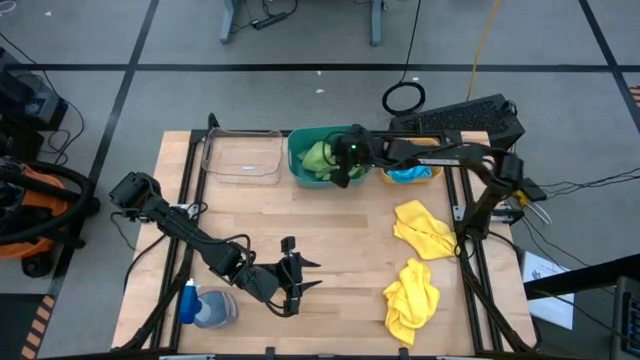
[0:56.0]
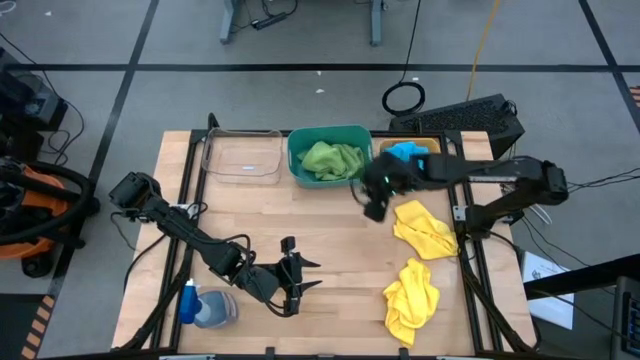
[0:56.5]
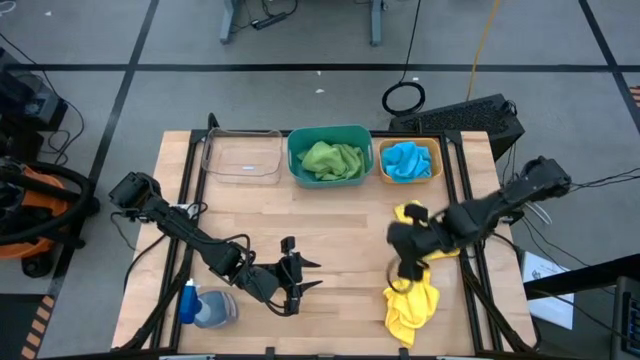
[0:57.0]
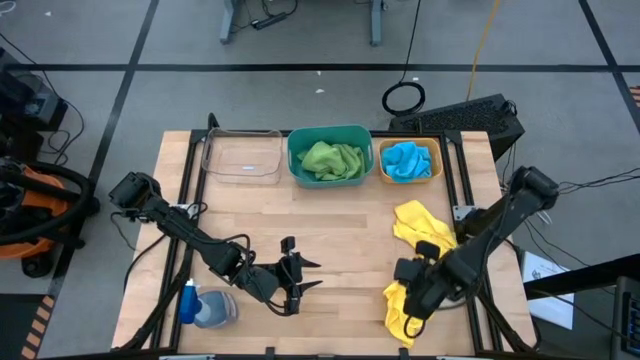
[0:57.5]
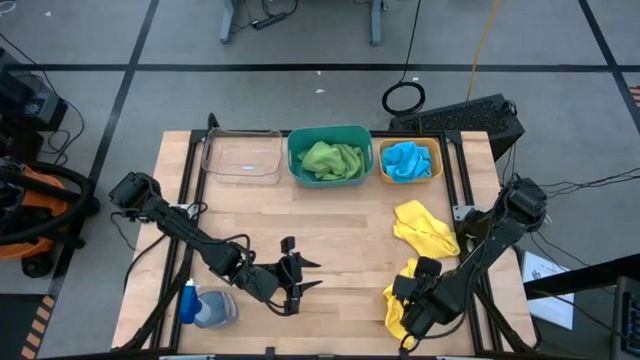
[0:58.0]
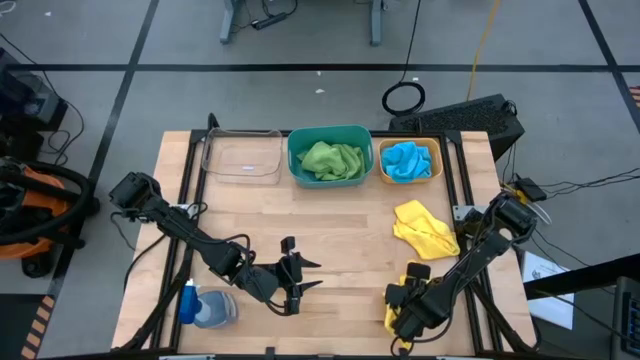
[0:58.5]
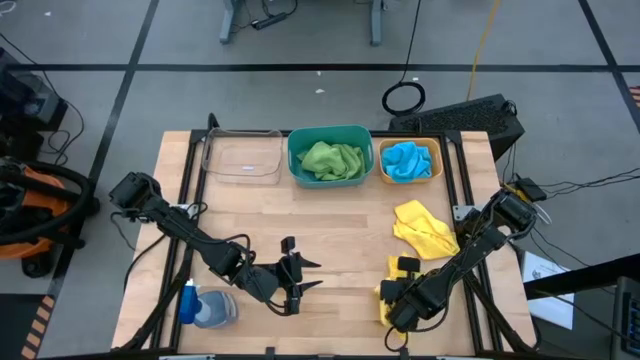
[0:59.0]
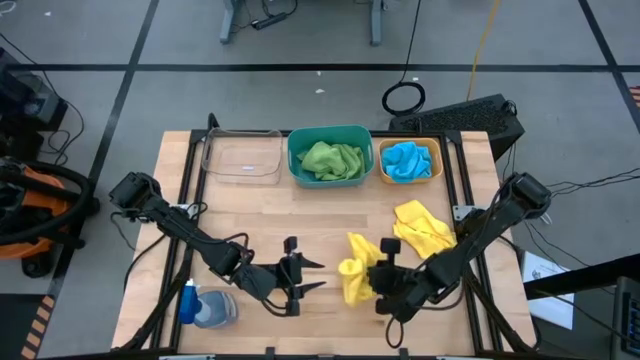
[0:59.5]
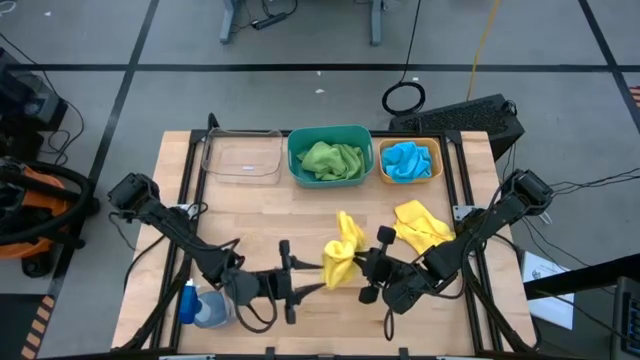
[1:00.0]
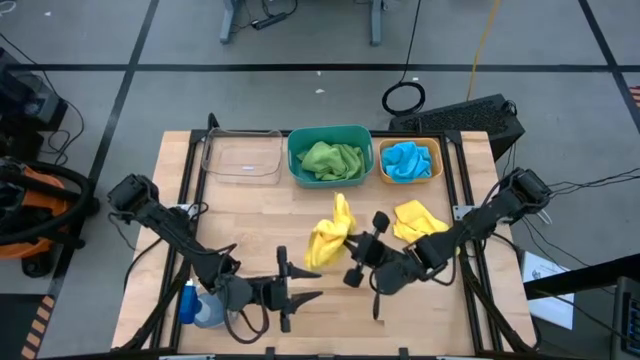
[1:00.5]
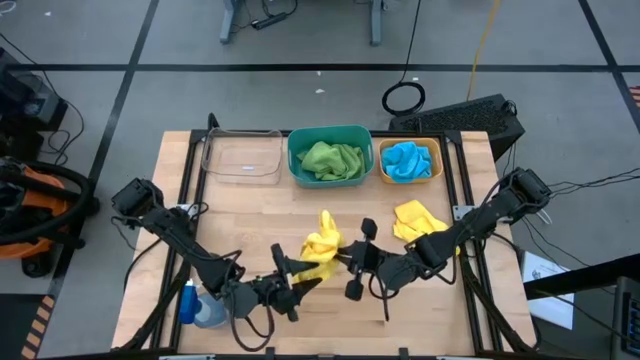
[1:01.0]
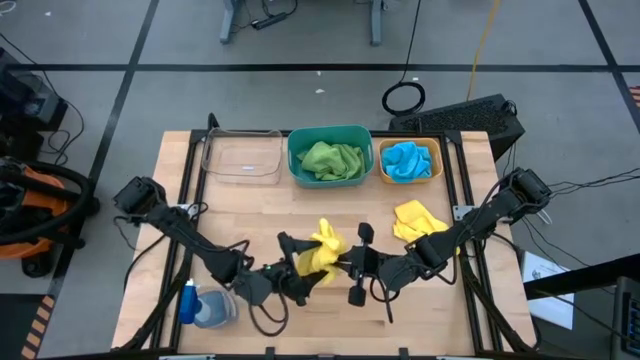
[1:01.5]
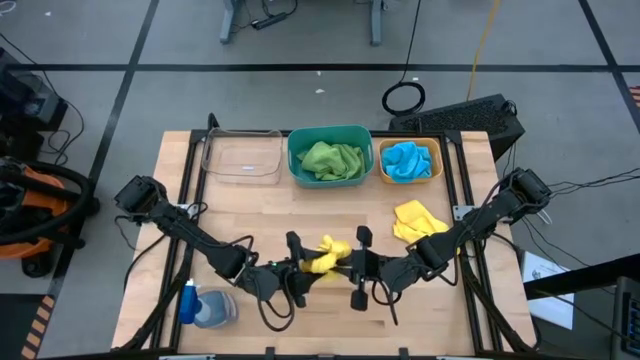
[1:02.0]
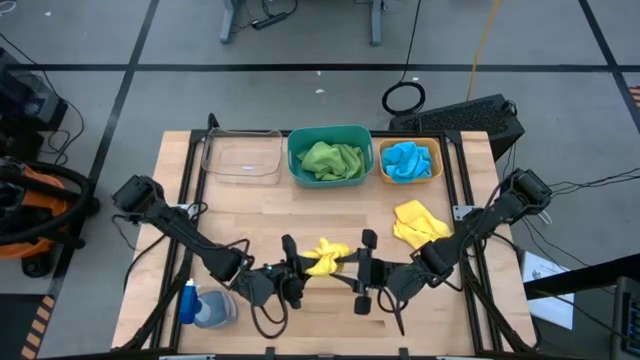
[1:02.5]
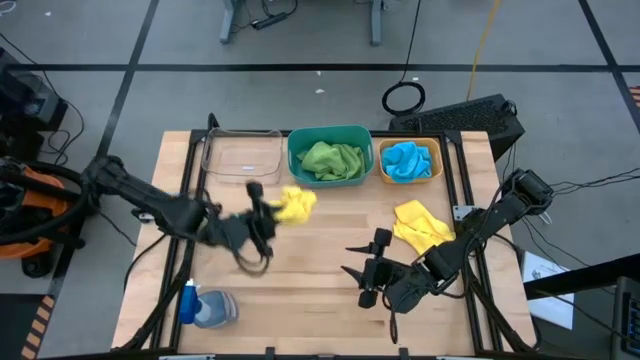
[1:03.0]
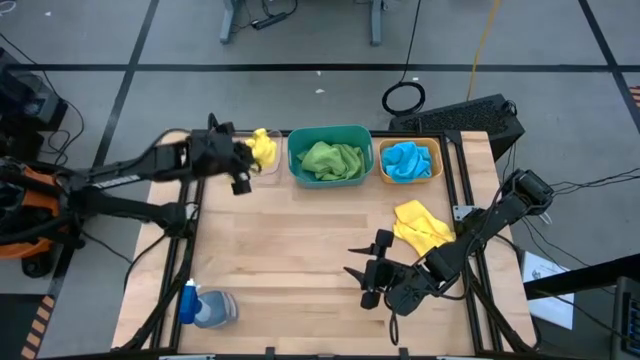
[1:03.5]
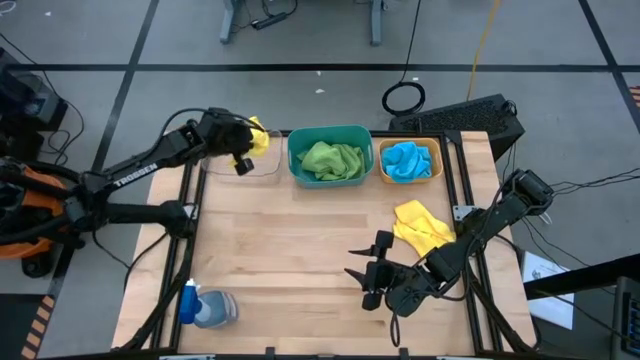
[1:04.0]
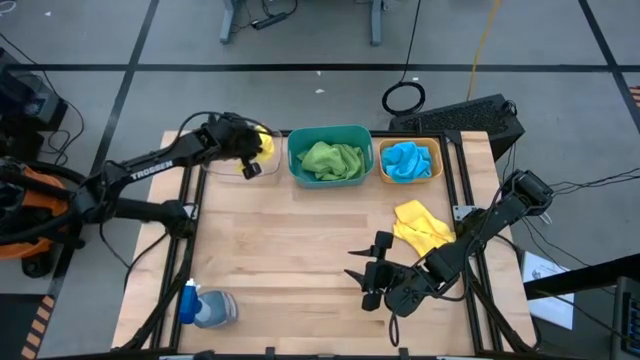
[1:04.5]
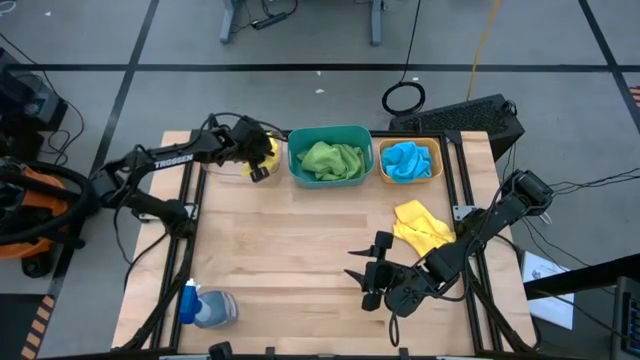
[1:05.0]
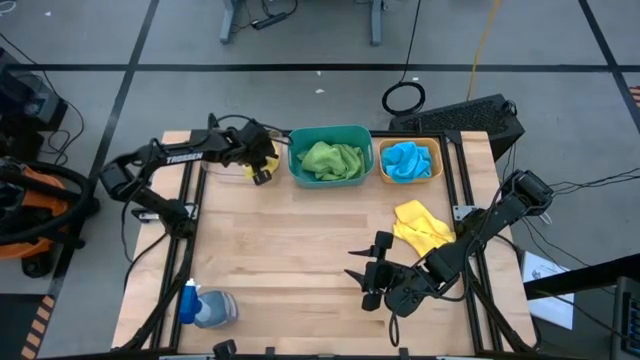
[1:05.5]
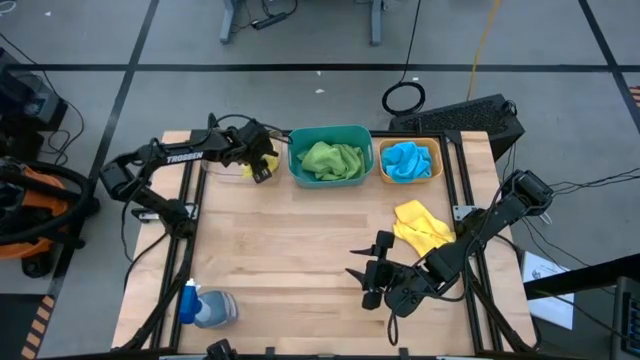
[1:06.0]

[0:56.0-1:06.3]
Task: Sort microfiber towel by color & place in baskets
Put the bottom yellow towel into the transparent bin

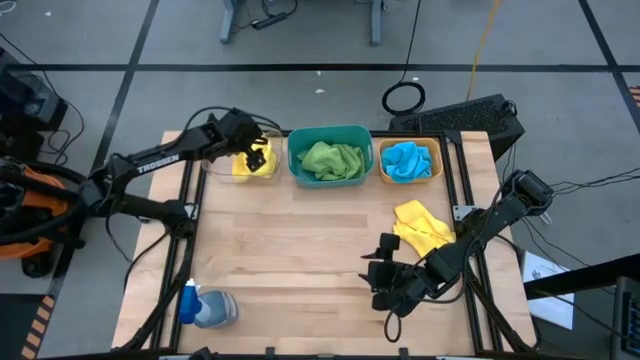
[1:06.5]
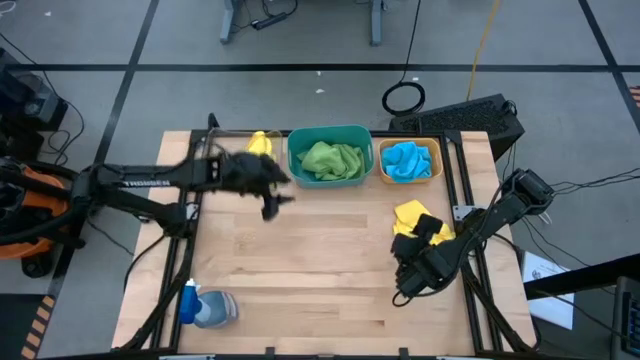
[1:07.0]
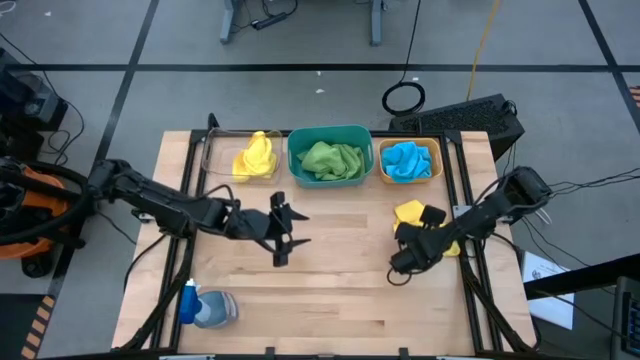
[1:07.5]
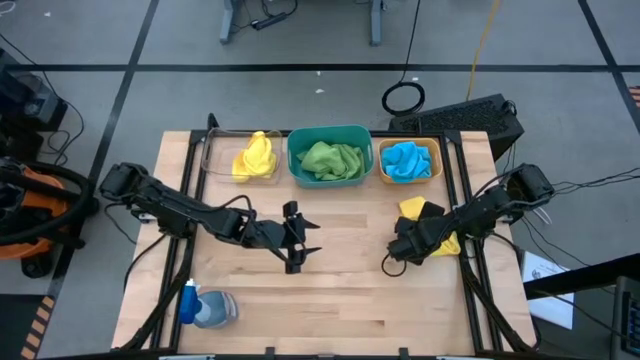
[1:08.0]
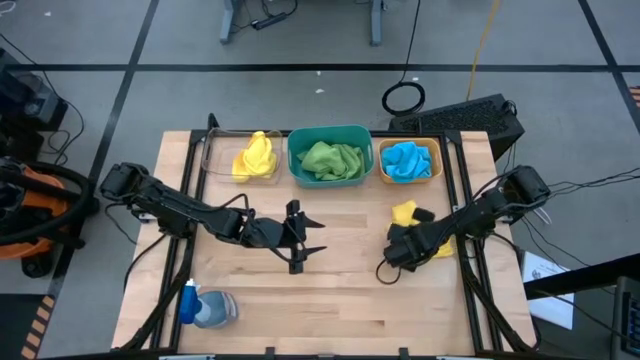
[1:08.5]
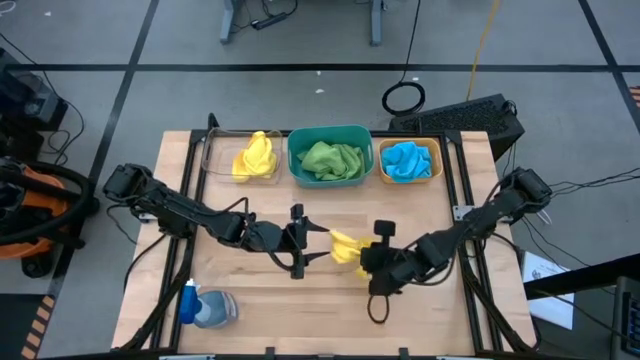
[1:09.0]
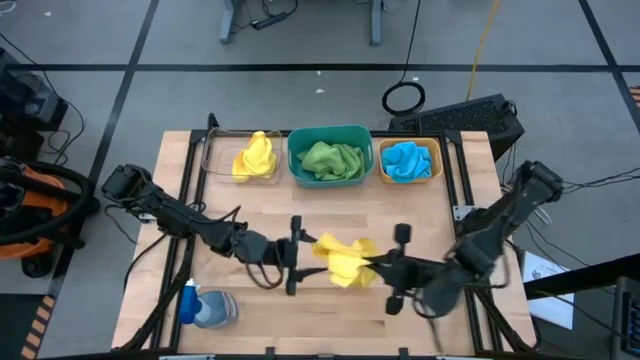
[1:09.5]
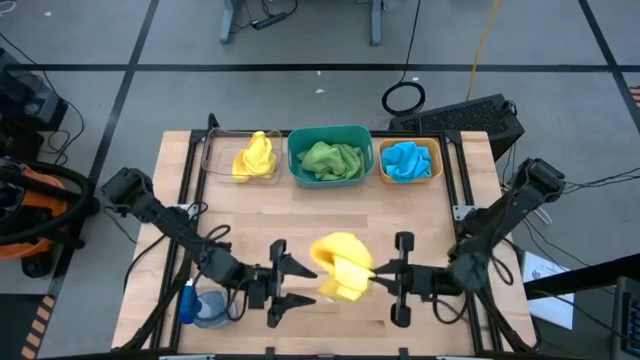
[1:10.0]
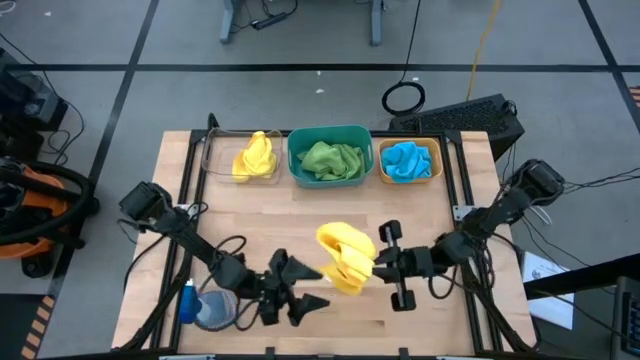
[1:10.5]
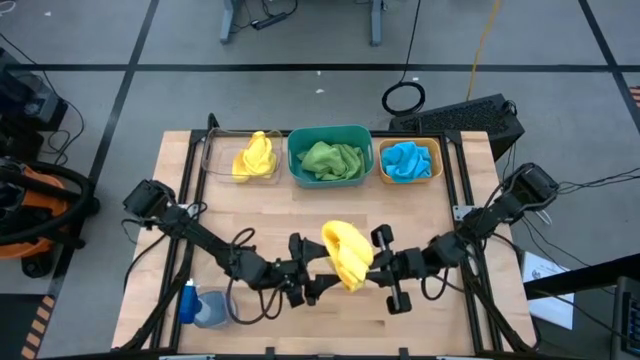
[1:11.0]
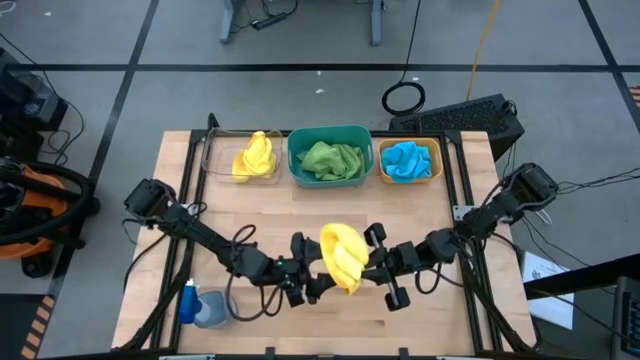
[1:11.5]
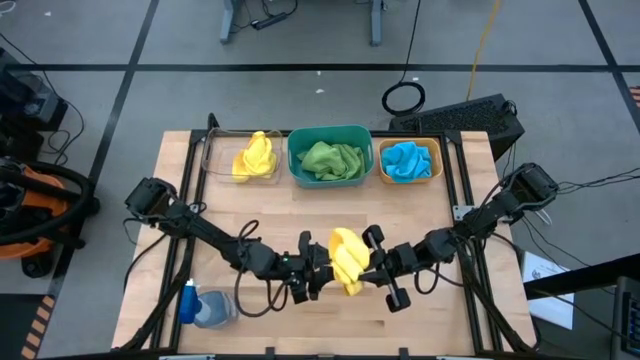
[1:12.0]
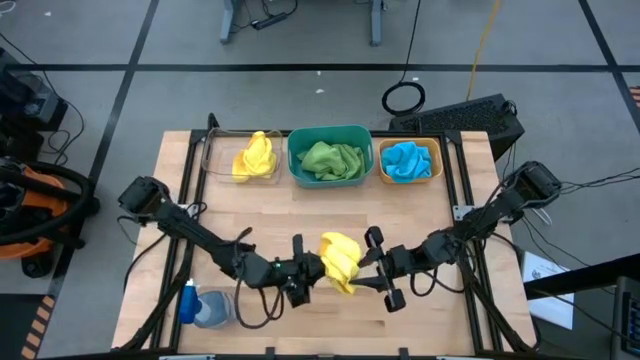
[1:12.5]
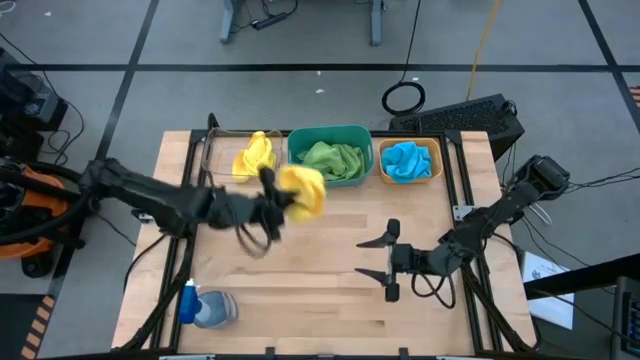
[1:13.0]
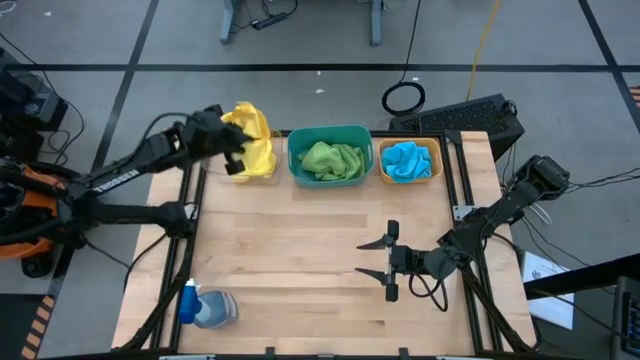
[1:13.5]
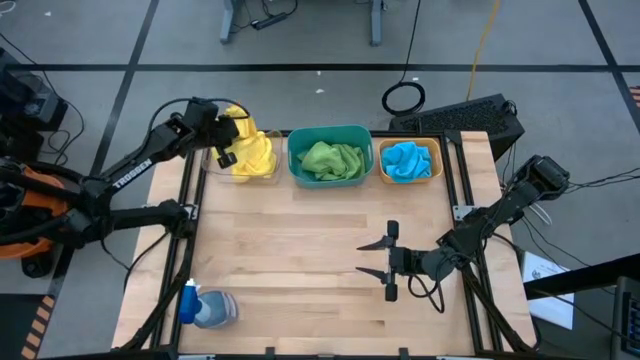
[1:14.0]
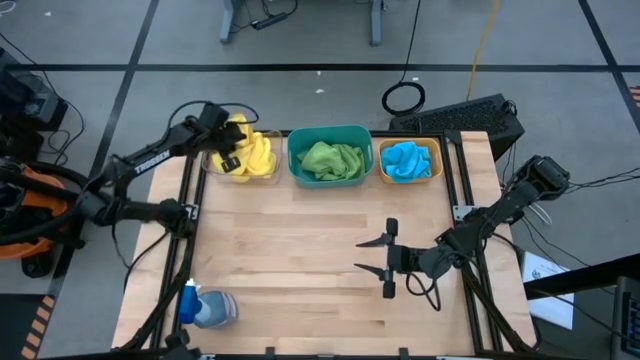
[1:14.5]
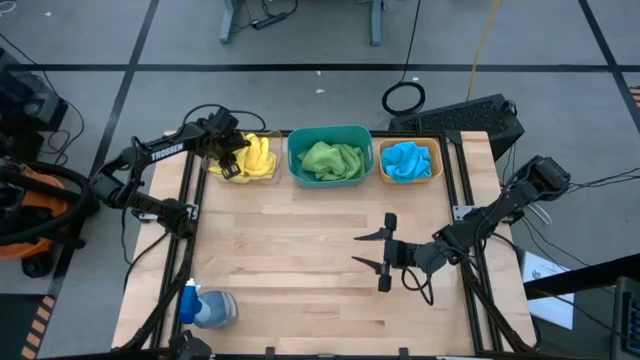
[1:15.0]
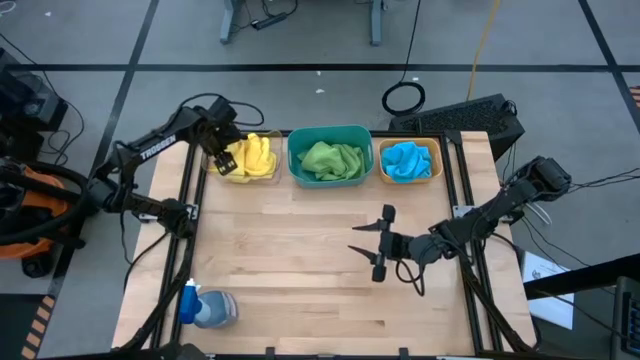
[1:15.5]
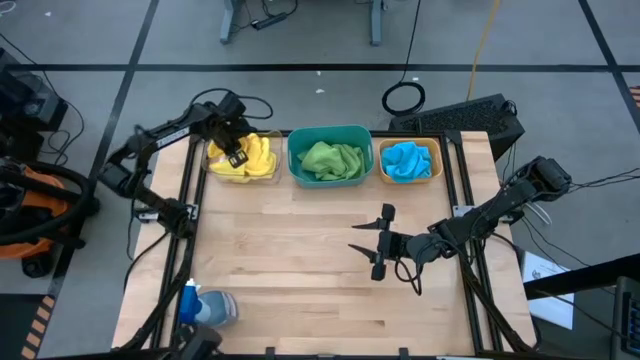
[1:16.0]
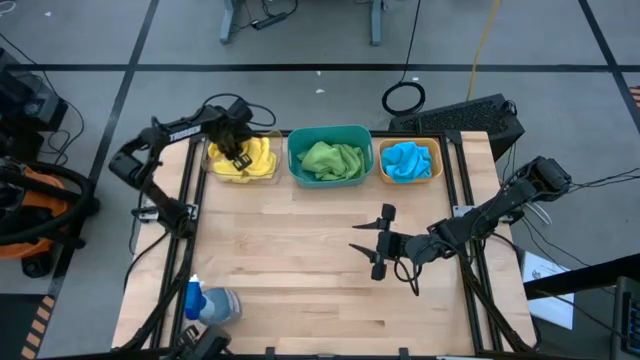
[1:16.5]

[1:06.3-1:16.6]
Put the yellow towel into the transparent bin

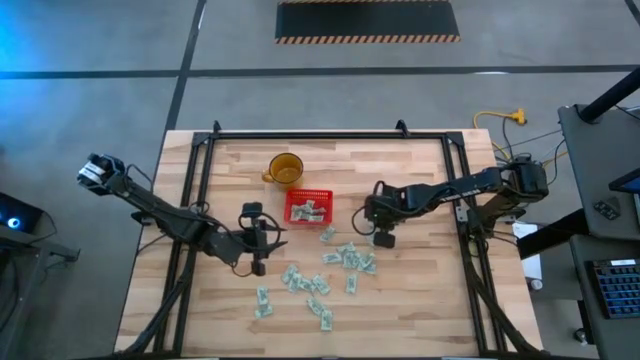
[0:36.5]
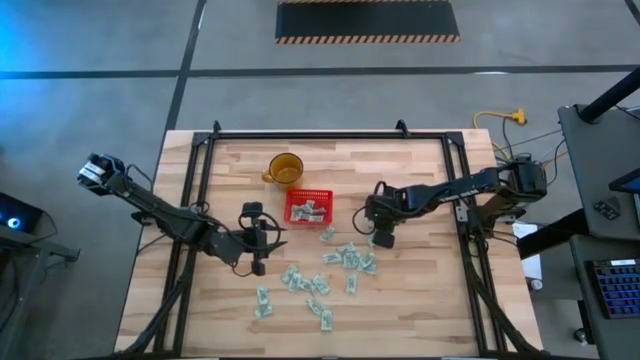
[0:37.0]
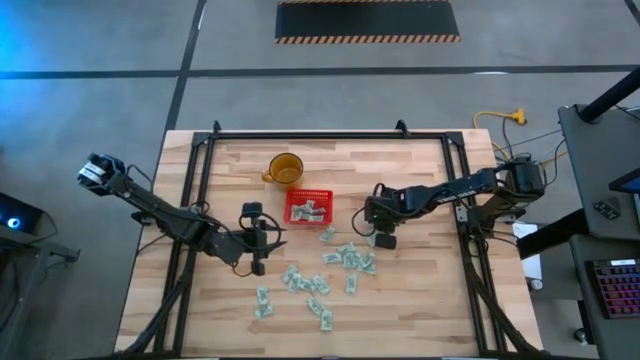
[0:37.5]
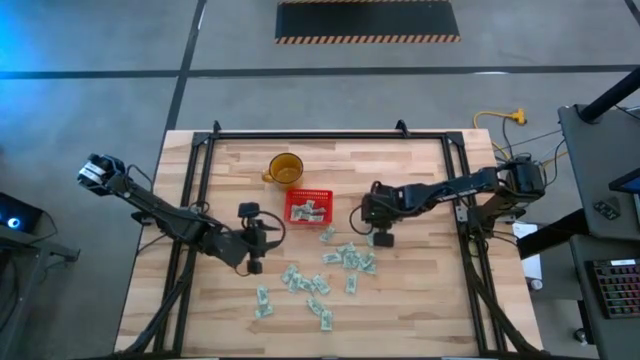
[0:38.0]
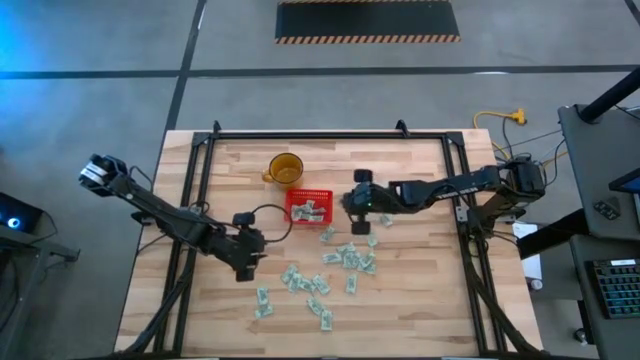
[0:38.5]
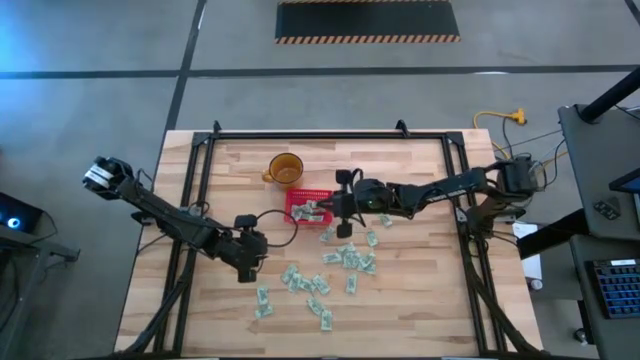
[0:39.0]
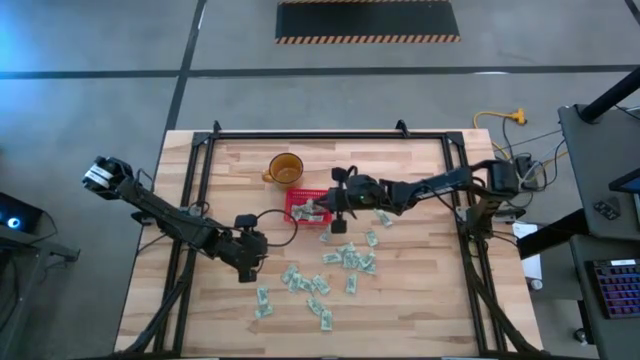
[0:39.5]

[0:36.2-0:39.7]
Task: Pick and place Stevia / Truvia into bins
Put the gray stevia packet into the red basket
